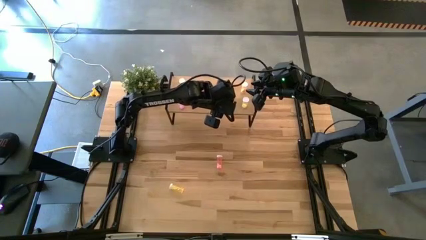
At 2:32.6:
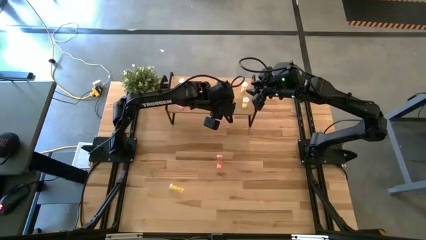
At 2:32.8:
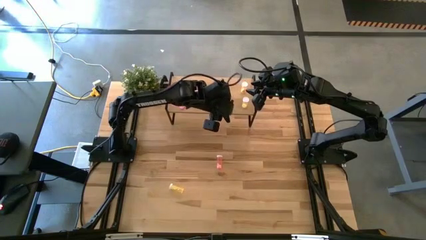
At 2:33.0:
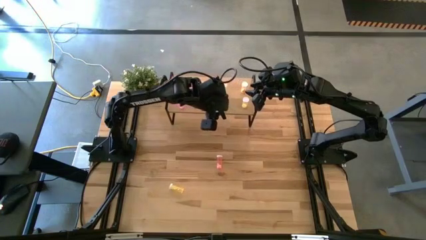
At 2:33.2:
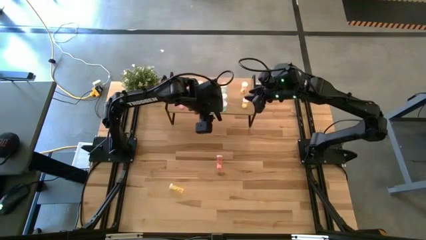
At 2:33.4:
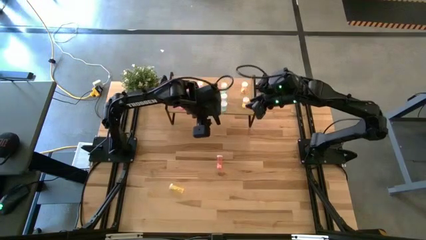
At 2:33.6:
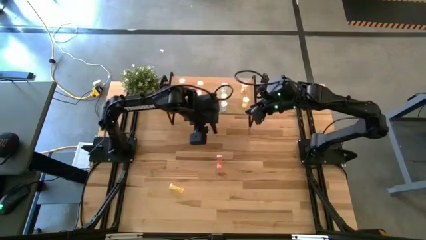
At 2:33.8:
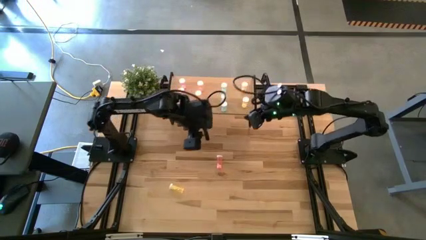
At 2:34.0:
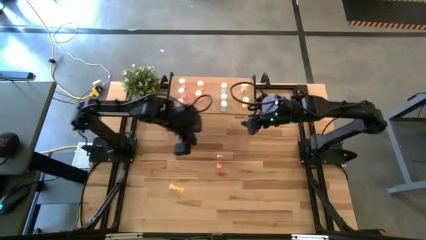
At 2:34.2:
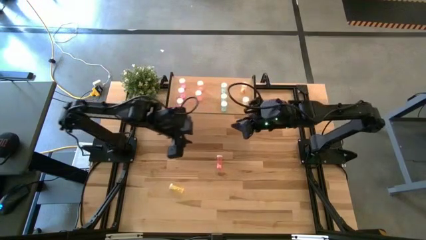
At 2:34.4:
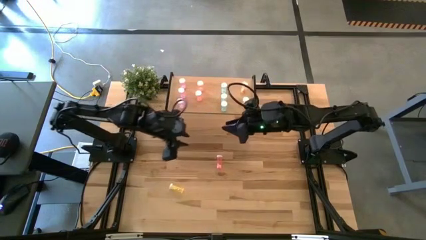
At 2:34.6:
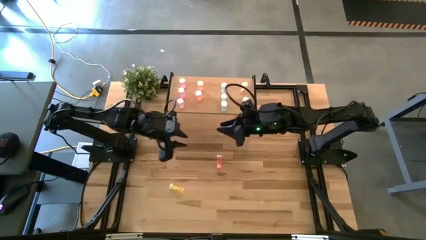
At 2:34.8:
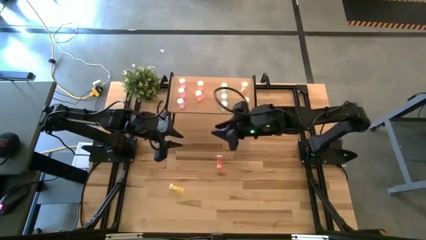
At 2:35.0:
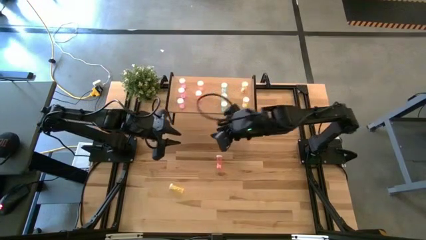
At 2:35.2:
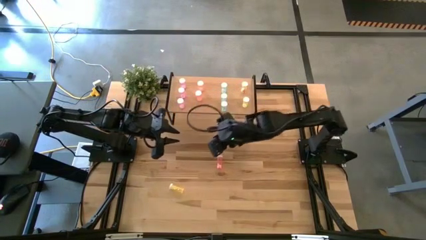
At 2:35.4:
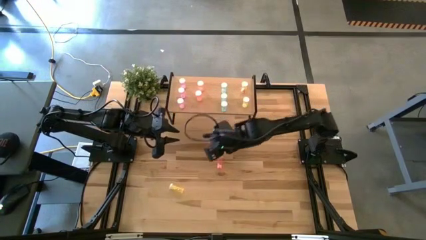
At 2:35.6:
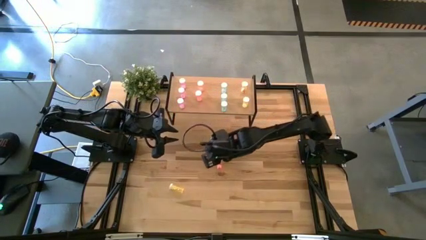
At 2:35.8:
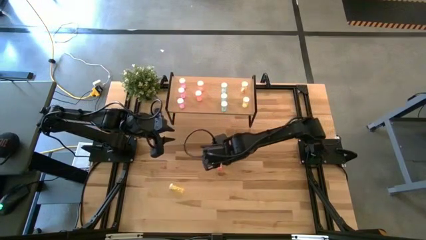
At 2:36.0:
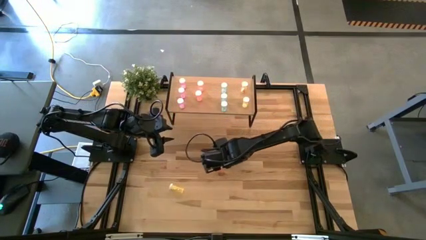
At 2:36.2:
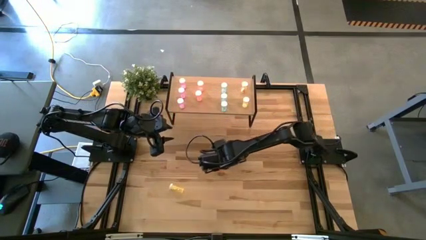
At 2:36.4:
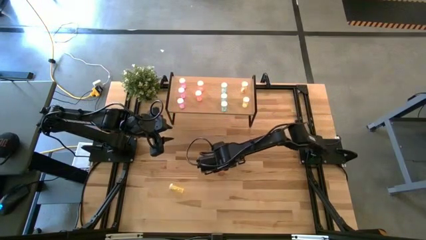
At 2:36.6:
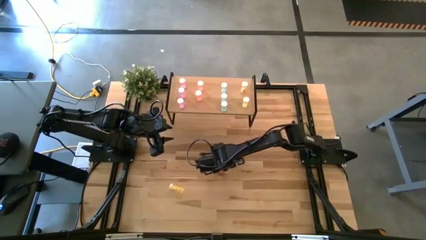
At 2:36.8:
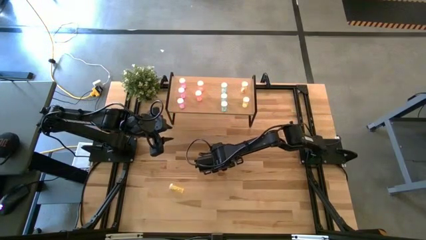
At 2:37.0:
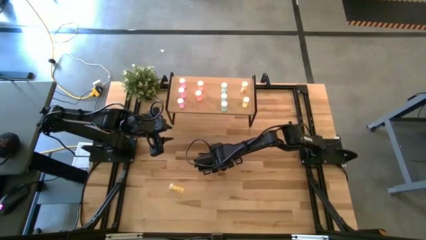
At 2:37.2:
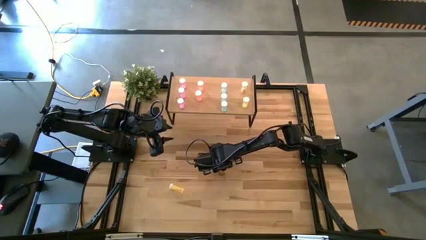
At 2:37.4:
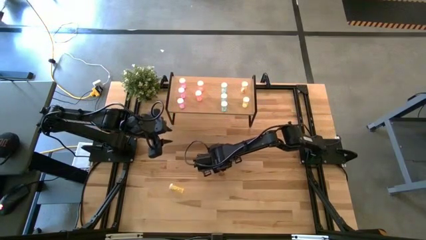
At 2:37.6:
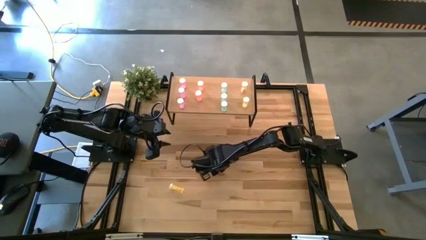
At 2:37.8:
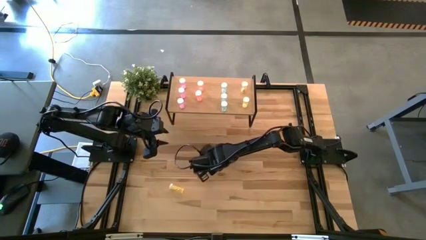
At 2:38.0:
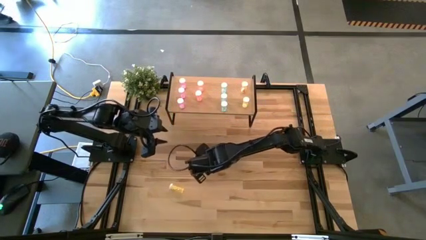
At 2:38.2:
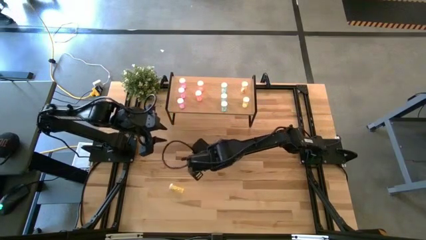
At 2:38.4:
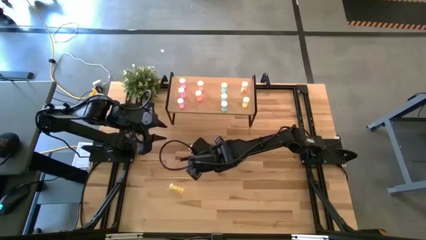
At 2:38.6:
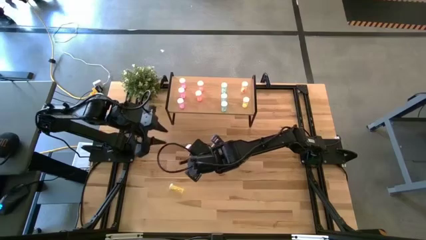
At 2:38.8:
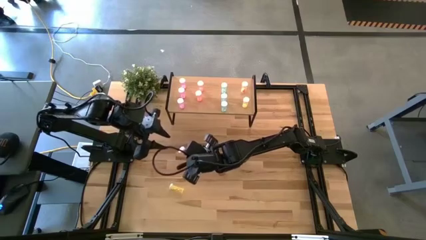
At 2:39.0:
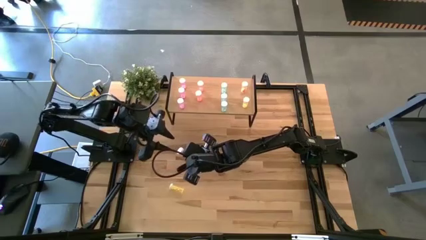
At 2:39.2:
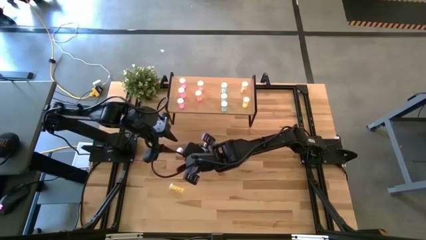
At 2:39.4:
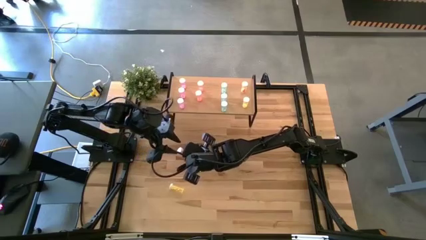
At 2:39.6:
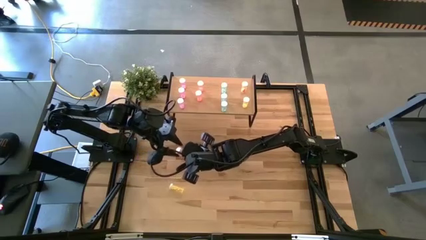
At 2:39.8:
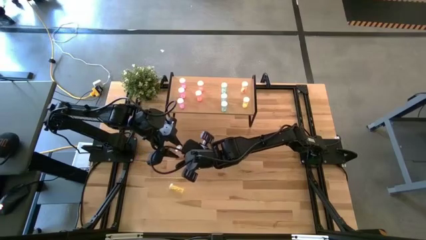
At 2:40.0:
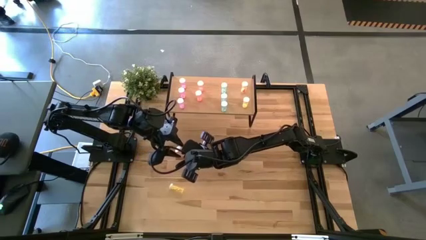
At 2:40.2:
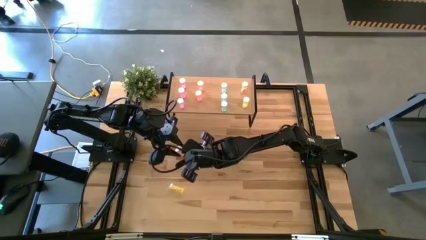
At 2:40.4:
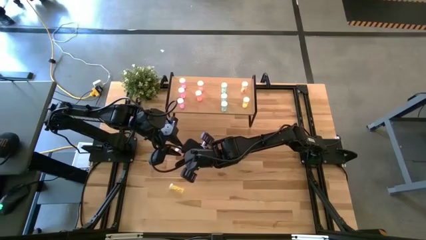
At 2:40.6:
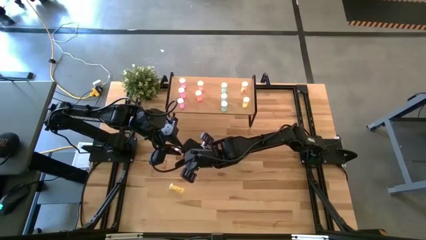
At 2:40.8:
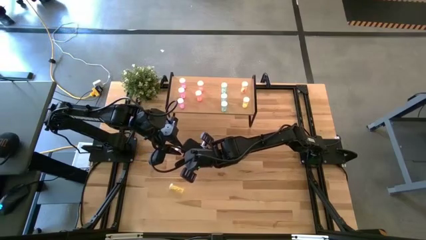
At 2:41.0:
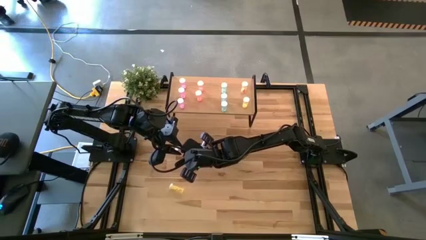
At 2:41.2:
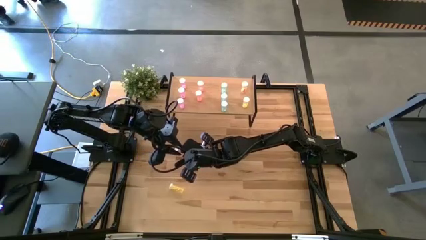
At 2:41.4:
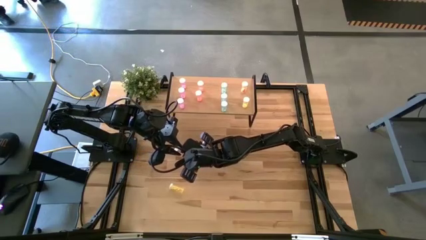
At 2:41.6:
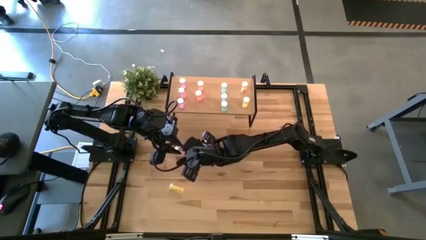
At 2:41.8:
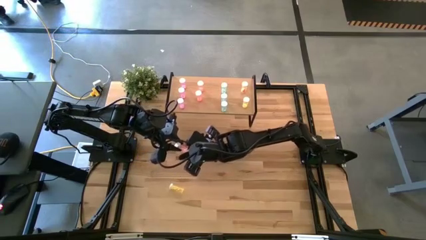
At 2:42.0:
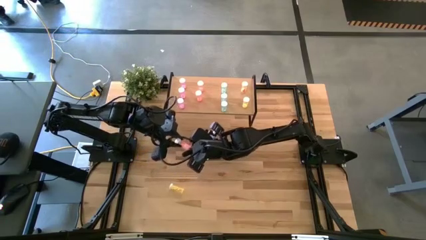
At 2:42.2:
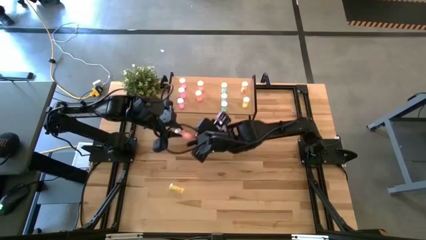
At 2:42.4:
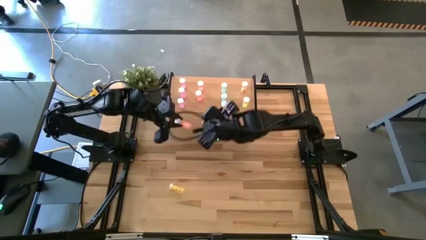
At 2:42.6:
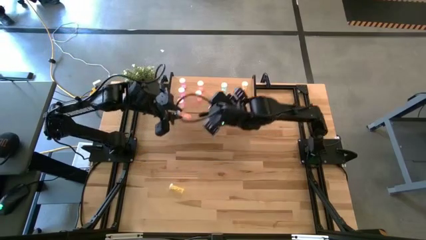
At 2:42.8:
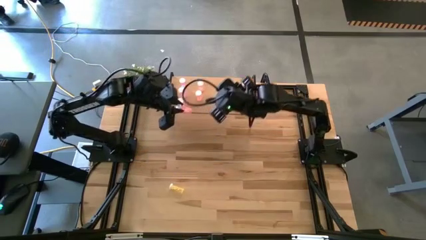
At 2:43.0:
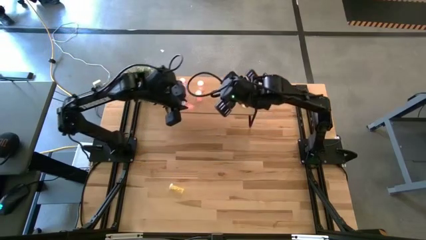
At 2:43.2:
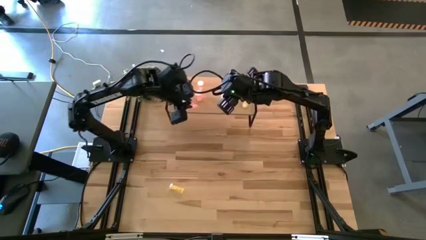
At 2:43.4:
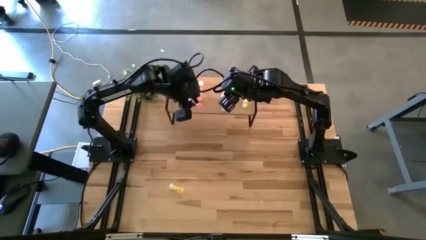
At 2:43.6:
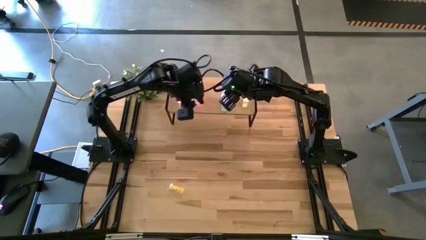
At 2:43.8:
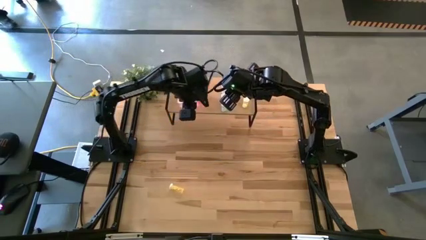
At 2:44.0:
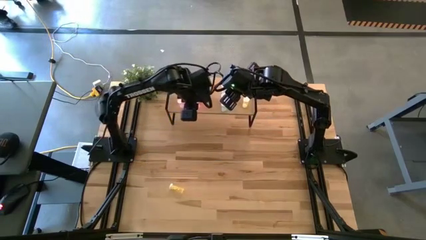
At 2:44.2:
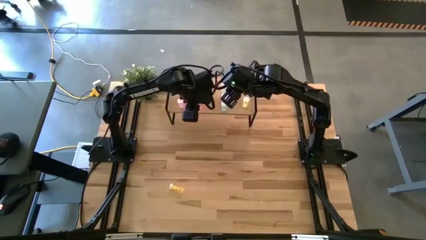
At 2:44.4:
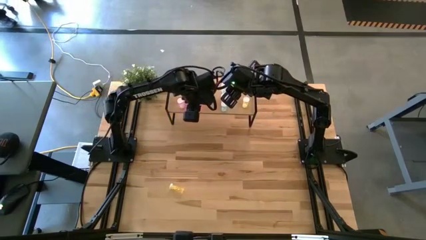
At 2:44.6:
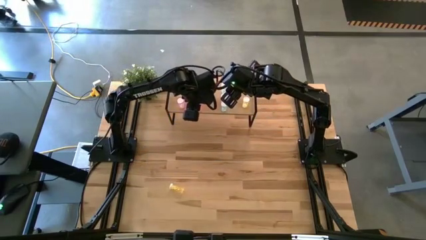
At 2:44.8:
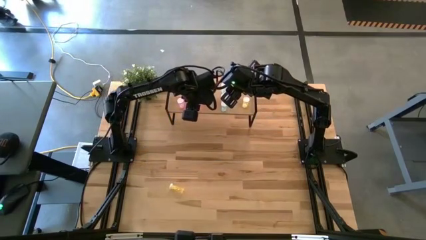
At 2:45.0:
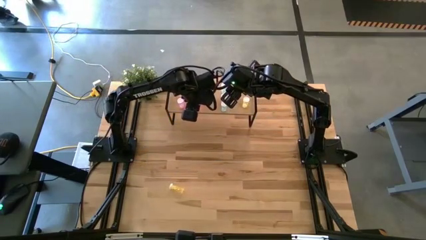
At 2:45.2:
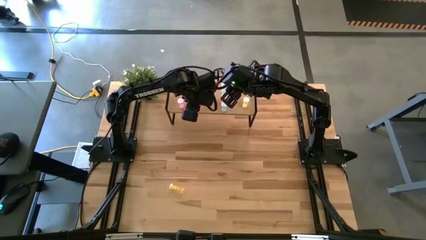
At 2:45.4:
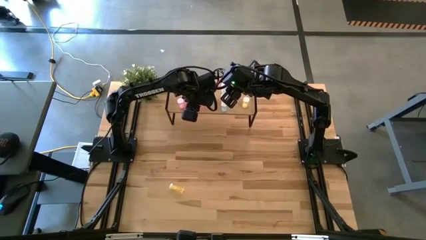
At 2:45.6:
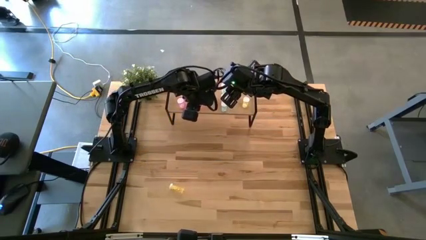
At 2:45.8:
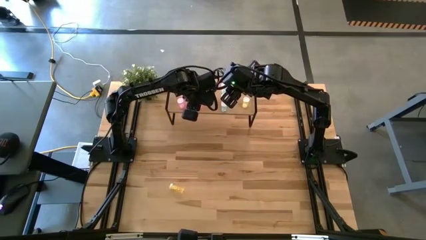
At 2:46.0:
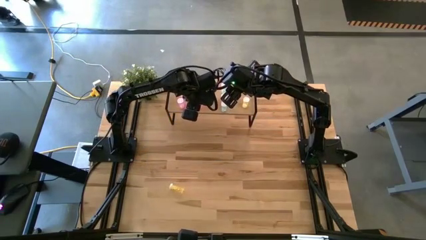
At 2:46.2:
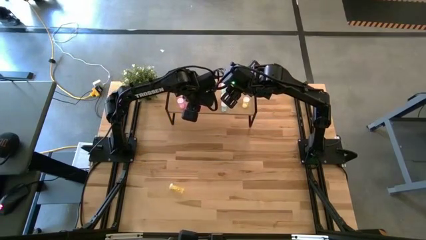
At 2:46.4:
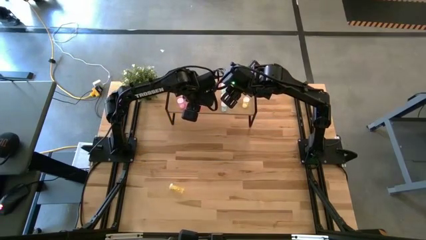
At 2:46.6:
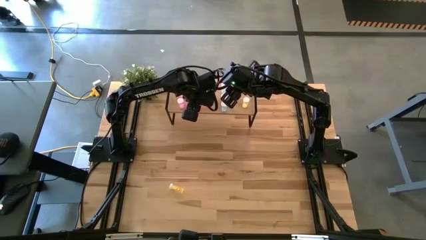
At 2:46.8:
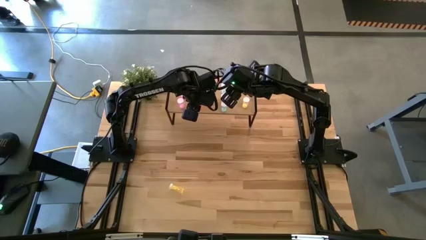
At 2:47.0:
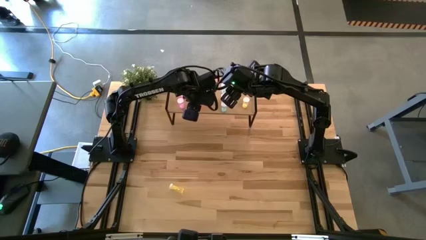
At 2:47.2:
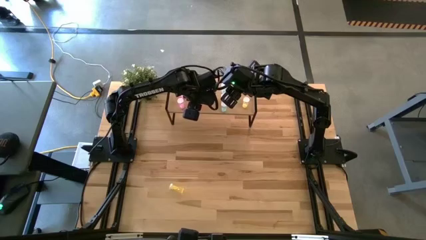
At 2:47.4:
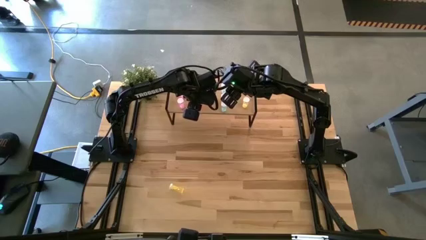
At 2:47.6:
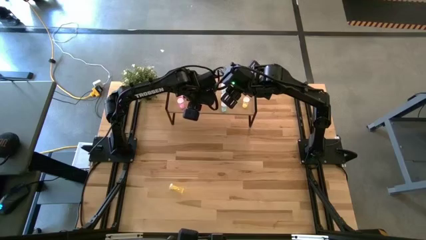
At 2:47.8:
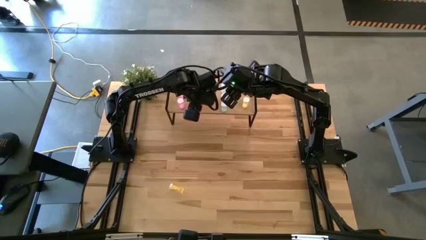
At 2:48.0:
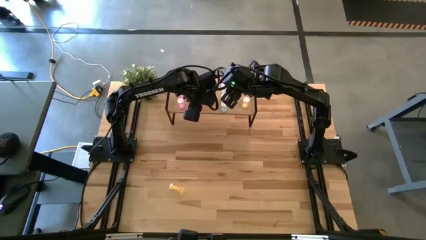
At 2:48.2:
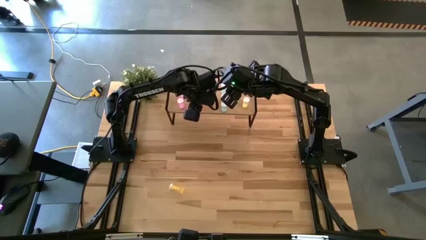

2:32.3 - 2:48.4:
Task: Pick and place medicine bottles onto shelf by color
Put the orange pill bottle on the shelf aligned with the other orange pill bottles
